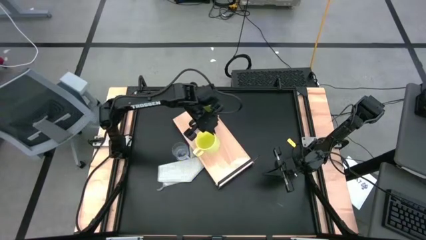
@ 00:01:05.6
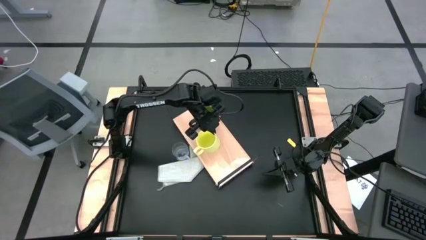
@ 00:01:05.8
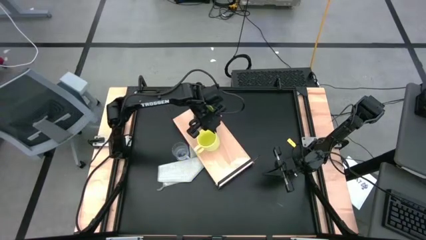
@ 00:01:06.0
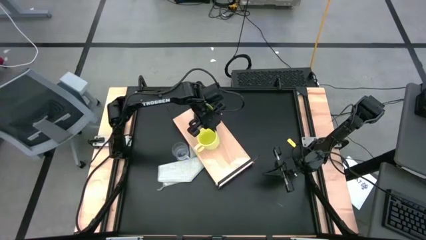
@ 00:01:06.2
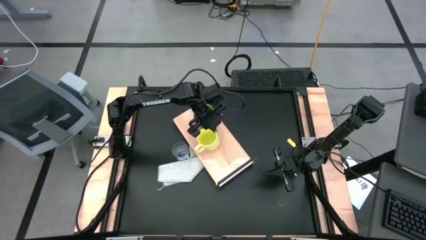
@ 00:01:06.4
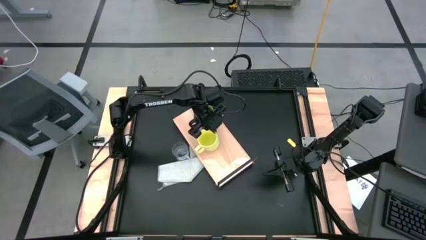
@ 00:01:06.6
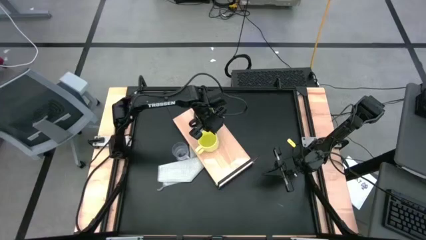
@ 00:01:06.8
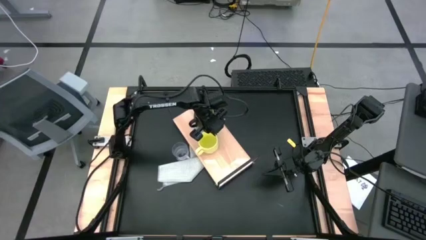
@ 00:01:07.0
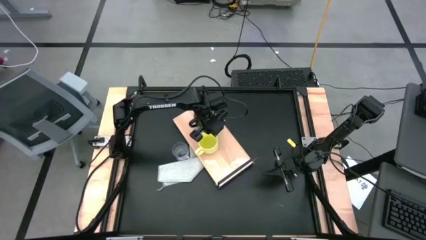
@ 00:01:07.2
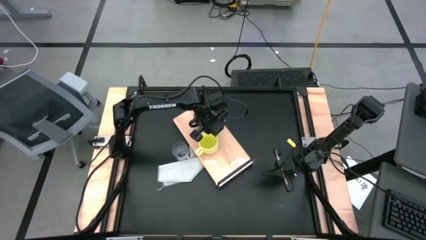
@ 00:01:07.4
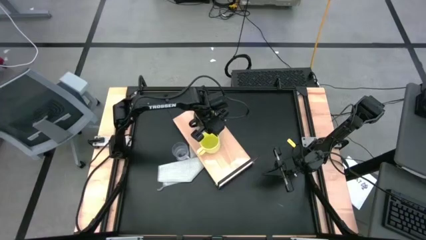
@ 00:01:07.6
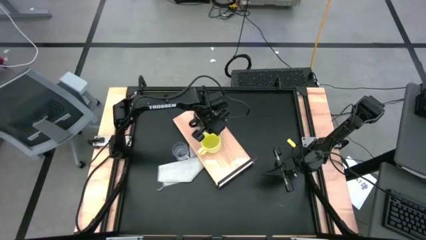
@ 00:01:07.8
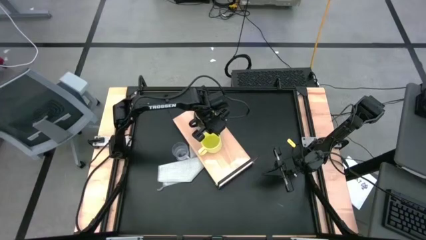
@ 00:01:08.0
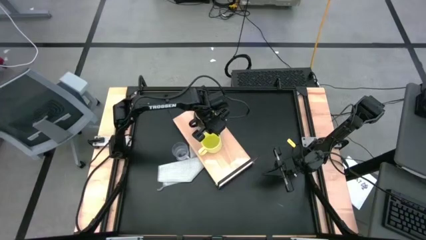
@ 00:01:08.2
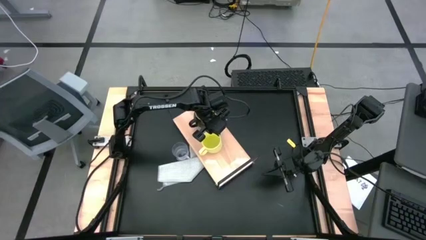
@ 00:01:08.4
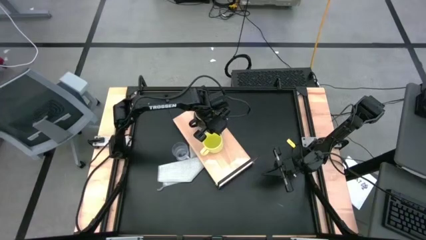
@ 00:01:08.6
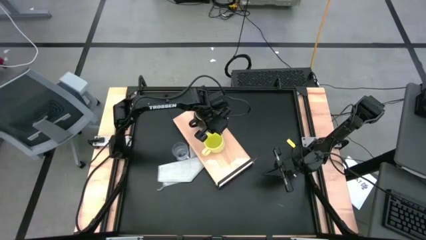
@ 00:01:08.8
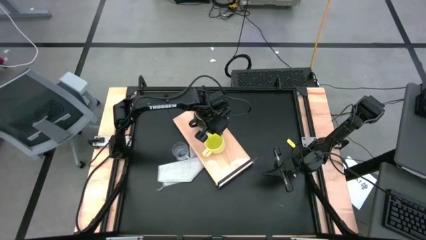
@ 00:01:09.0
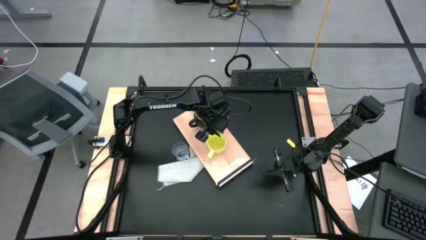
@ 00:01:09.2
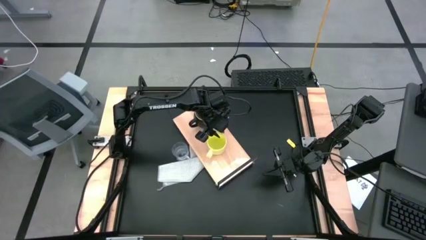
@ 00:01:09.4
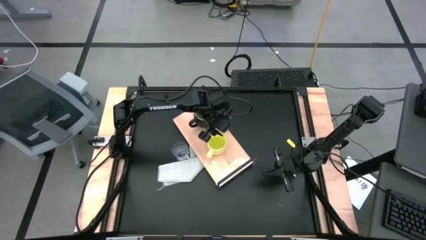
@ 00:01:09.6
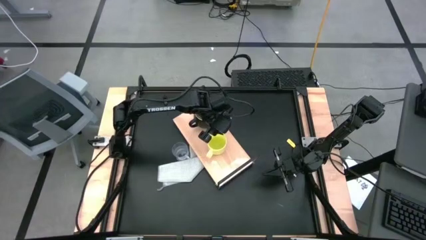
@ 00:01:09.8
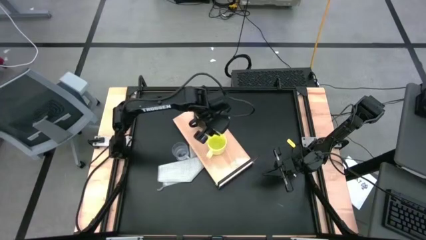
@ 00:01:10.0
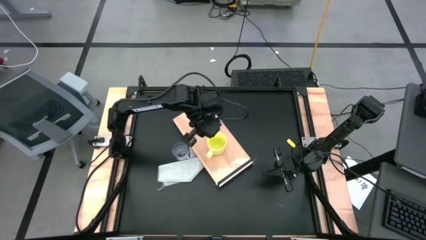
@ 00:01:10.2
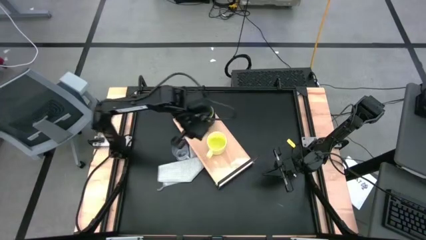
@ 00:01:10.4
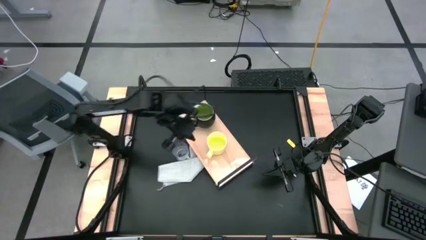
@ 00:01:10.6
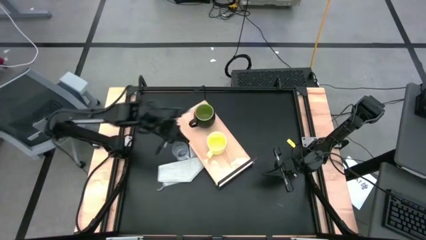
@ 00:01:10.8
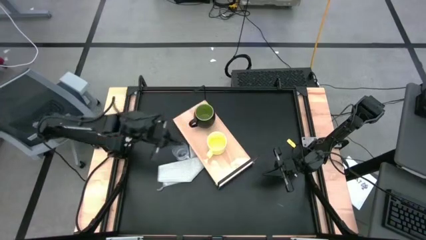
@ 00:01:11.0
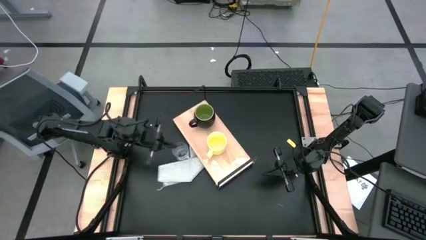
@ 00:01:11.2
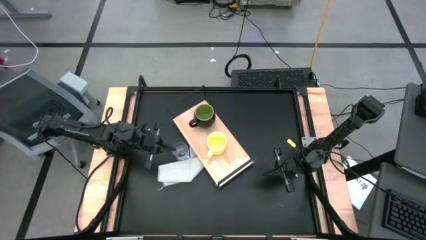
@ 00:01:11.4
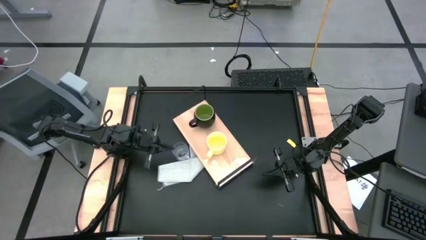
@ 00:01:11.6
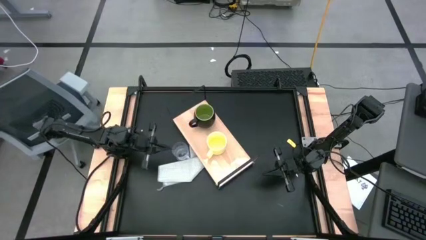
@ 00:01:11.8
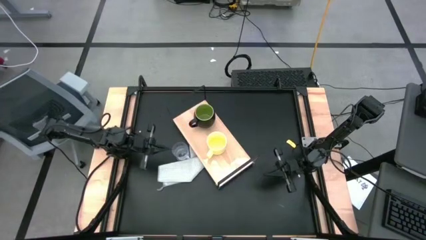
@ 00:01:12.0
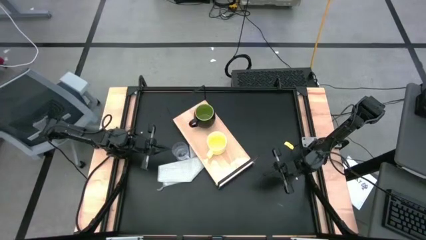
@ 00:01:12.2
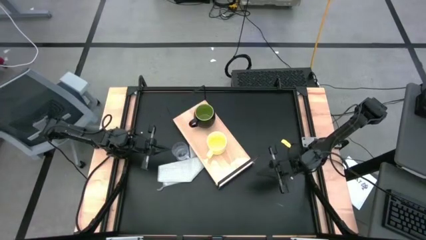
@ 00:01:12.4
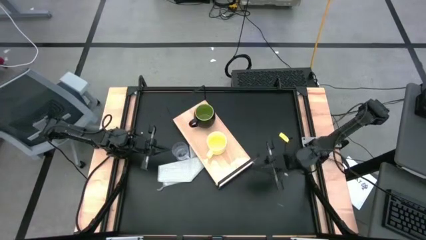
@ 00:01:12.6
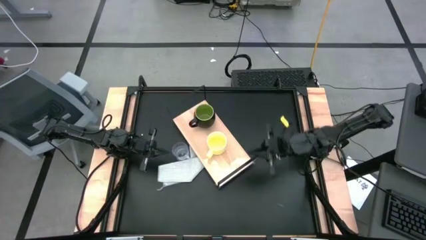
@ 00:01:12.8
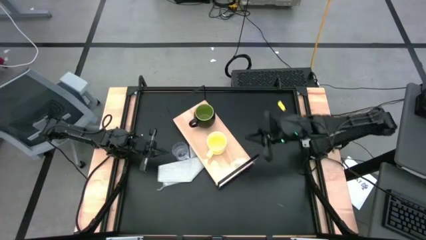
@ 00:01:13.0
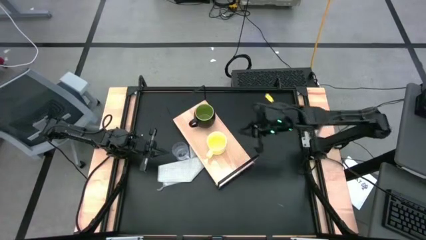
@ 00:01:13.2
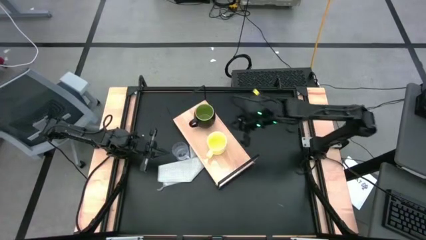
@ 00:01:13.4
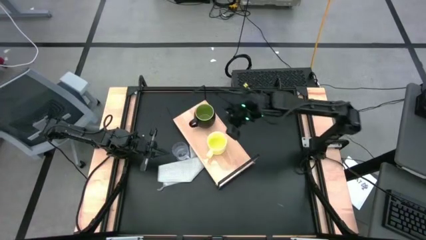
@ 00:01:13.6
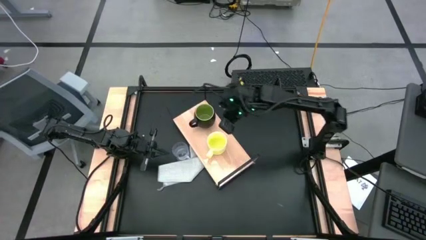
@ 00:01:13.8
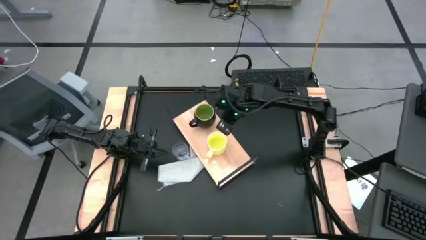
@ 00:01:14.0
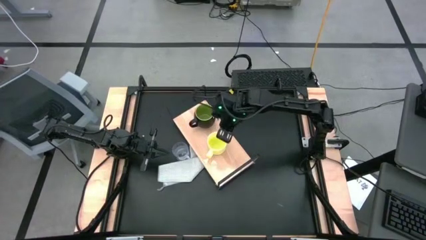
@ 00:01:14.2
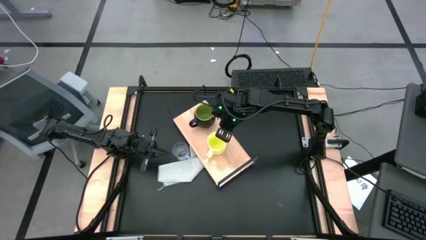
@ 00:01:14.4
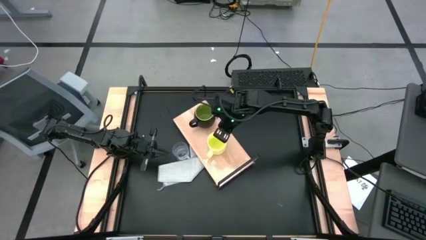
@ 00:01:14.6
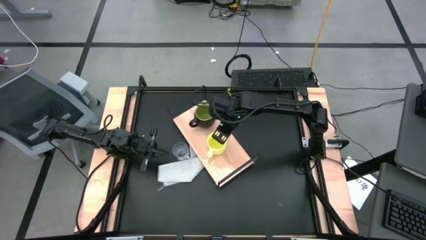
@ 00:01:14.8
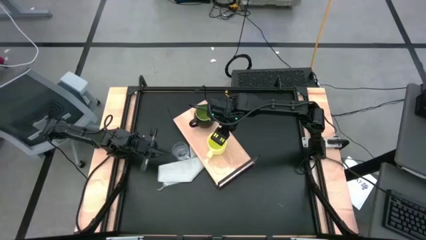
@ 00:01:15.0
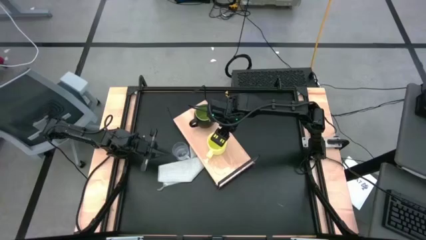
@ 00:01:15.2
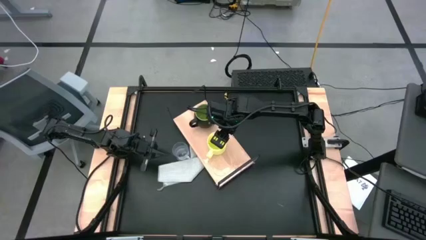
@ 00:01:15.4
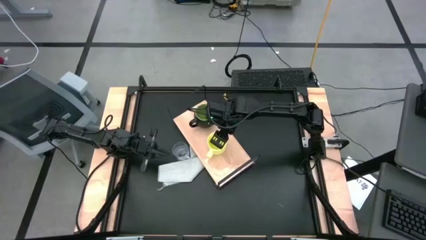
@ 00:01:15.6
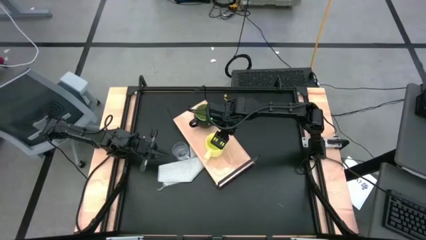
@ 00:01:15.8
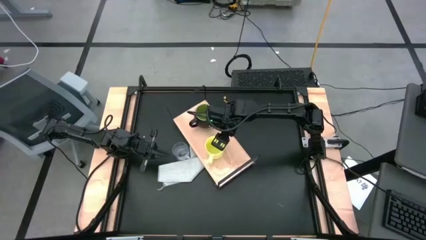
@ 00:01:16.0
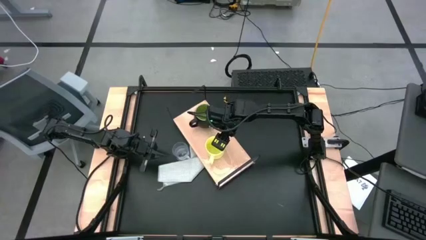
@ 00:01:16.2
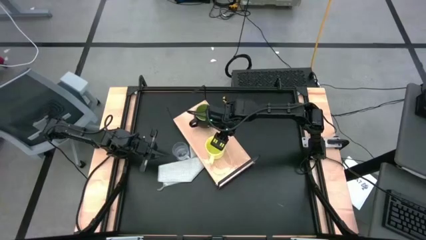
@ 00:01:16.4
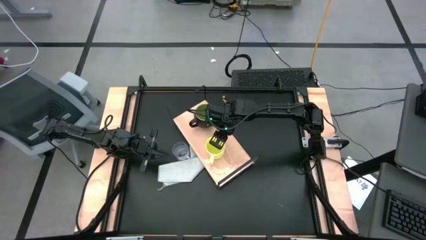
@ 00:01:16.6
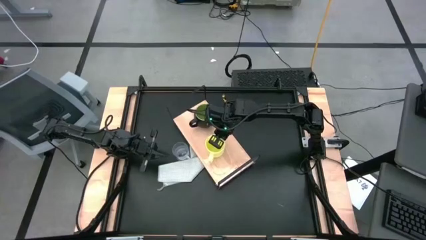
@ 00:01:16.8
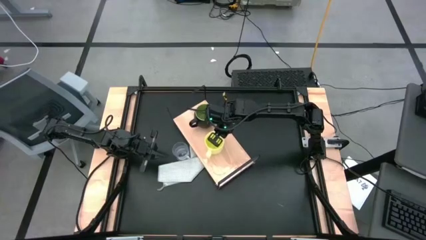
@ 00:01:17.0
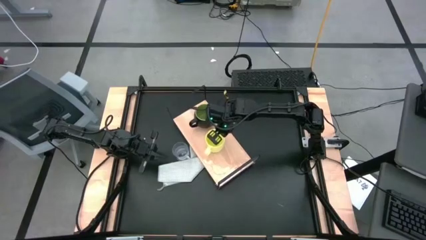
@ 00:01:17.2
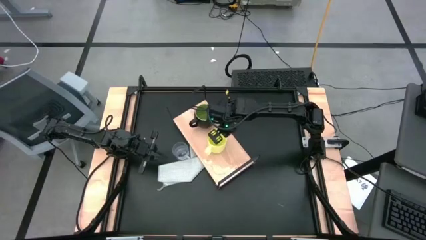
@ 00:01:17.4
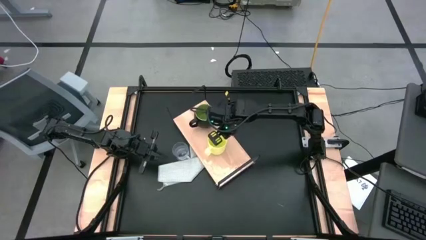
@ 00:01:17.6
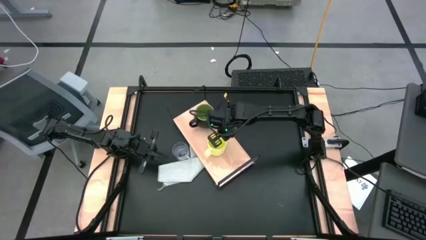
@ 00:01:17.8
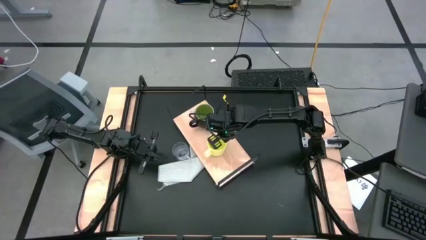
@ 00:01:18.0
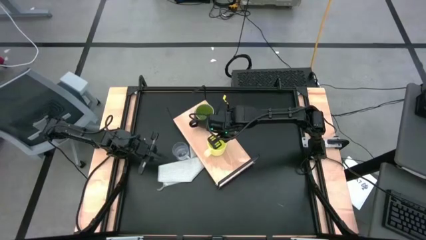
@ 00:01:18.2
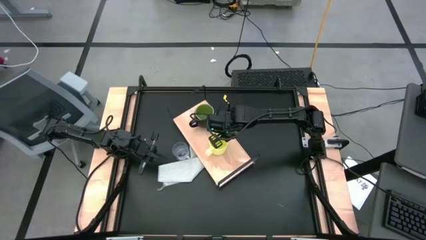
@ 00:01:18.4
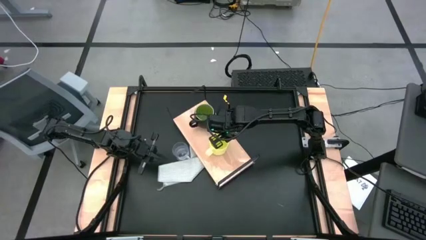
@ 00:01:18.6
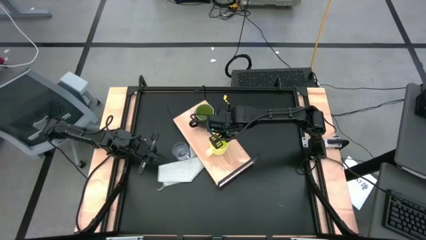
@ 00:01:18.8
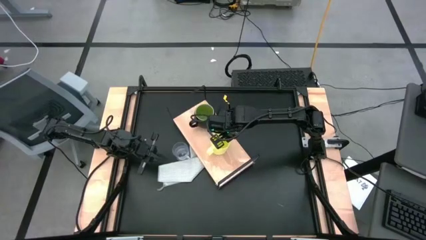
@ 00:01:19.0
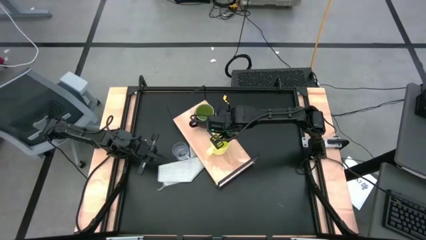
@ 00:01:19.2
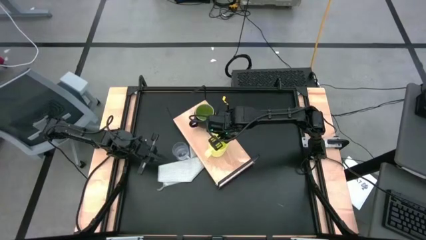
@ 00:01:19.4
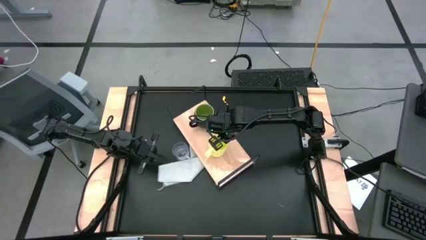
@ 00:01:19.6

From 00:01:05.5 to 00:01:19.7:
Task: Stack small to large cups/mugs on shelf
Put the yellow mug on the shelf

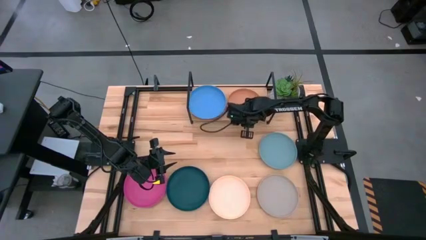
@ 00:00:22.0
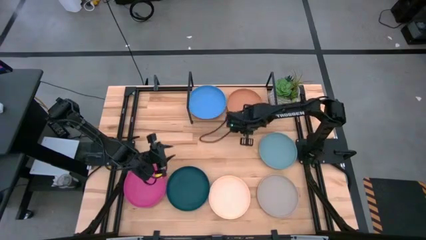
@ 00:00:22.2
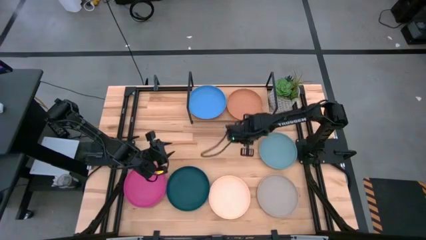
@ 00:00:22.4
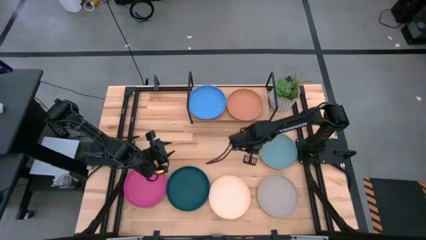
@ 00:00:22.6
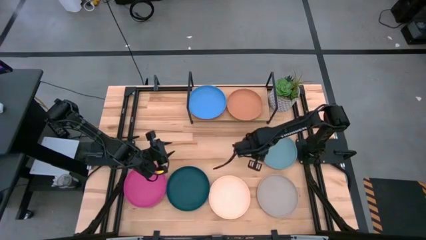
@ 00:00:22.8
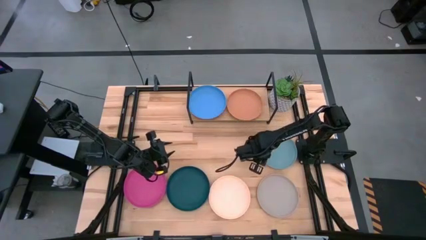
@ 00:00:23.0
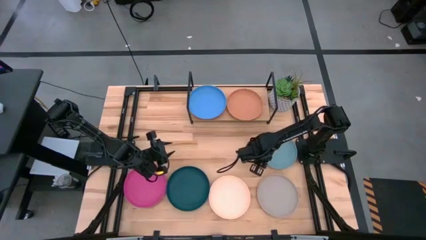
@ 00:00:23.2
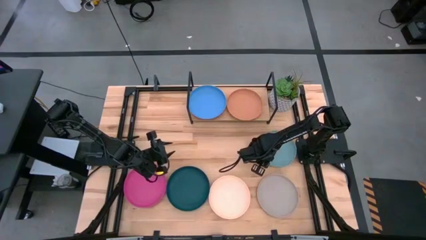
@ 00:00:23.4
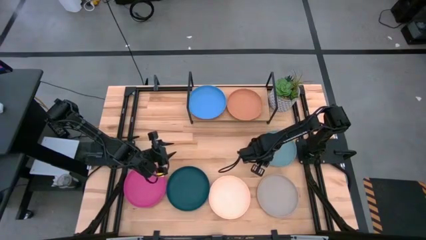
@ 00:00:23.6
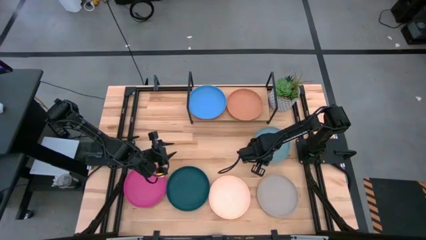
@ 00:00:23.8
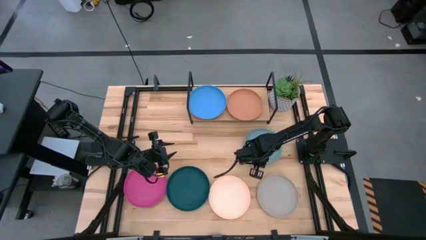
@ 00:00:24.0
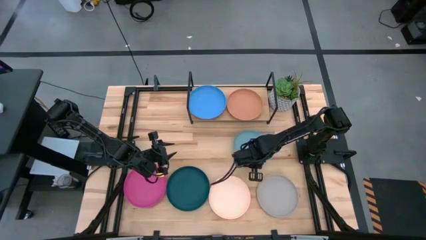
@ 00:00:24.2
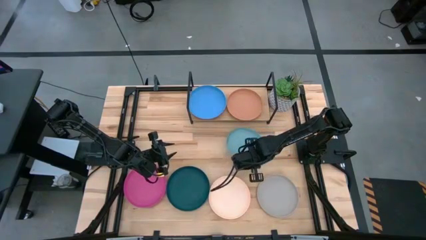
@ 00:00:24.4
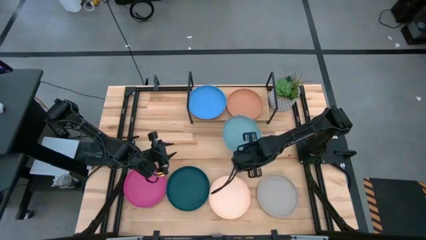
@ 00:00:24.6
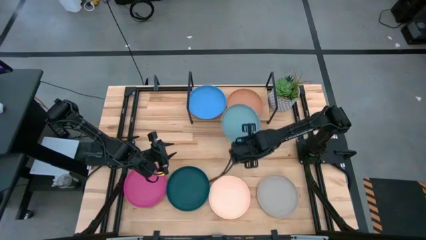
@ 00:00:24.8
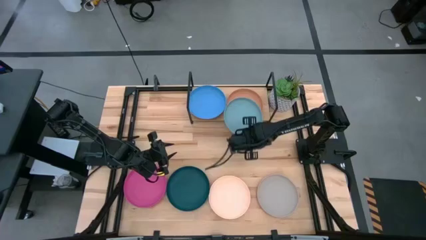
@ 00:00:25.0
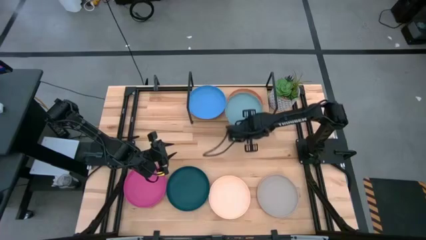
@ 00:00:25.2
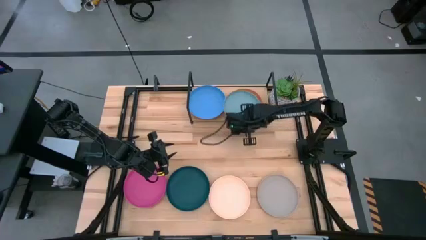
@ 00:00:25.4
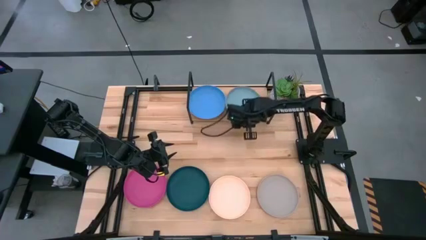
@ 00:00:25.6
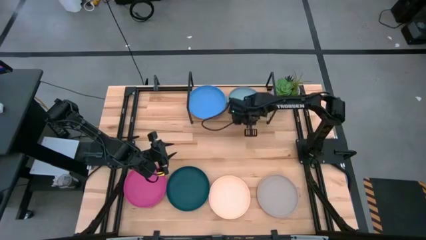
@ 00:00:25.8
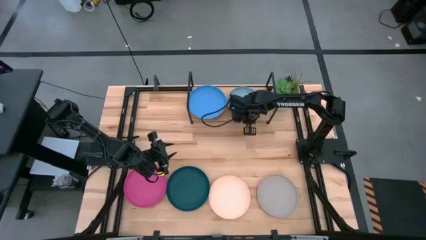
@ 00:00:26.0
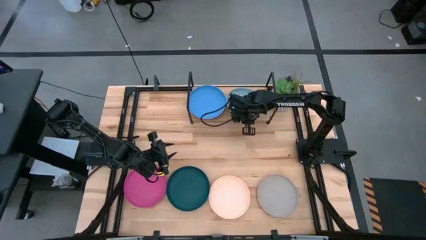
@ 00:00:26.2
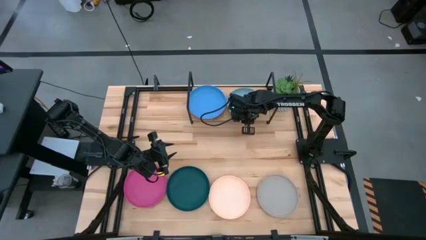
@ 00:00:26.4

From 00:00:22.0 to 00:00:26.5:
Task: Place and stack plates onto a shelf
Stack the light blue plate on top of the brown plate on the shelf
